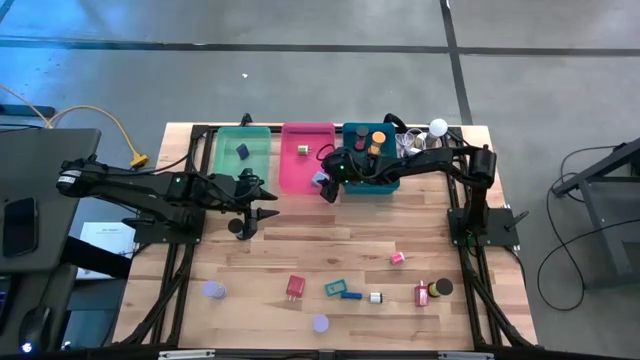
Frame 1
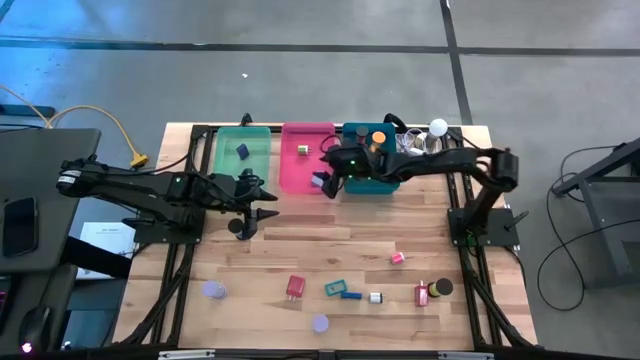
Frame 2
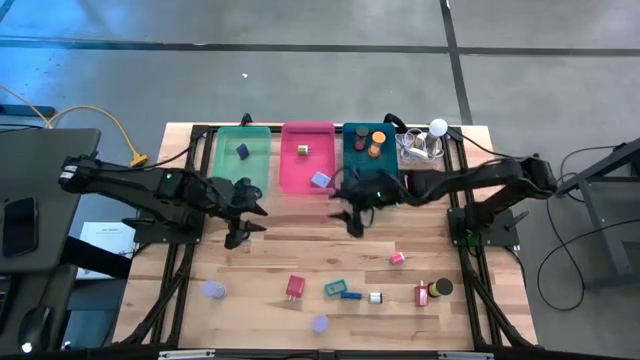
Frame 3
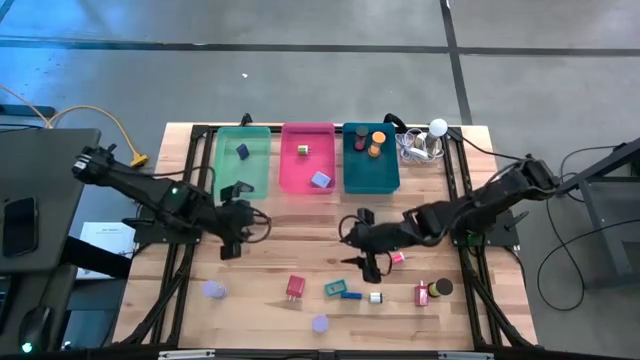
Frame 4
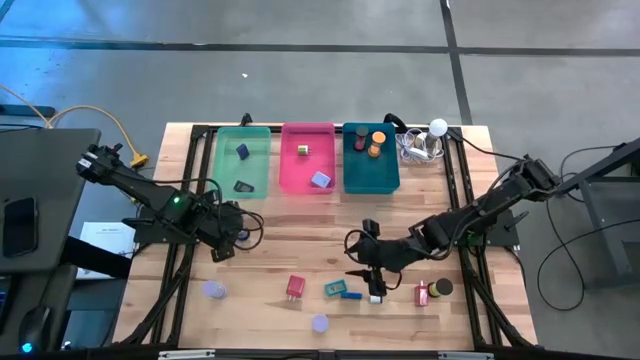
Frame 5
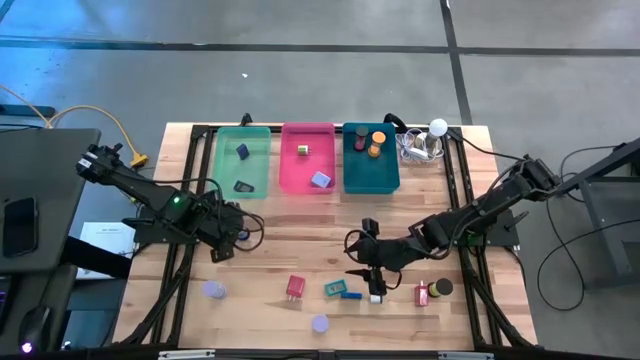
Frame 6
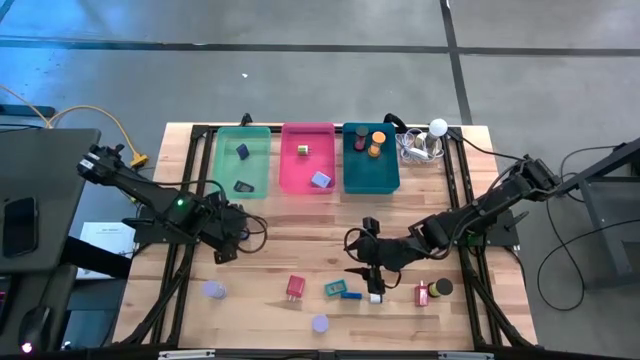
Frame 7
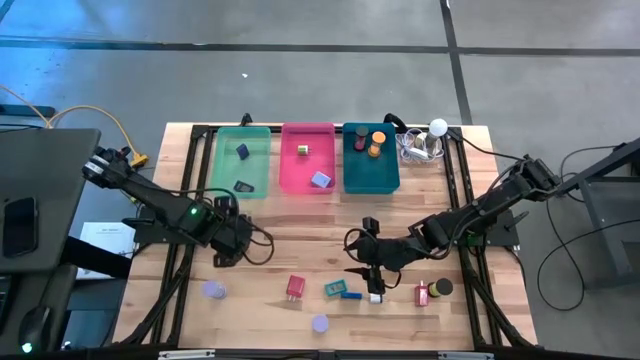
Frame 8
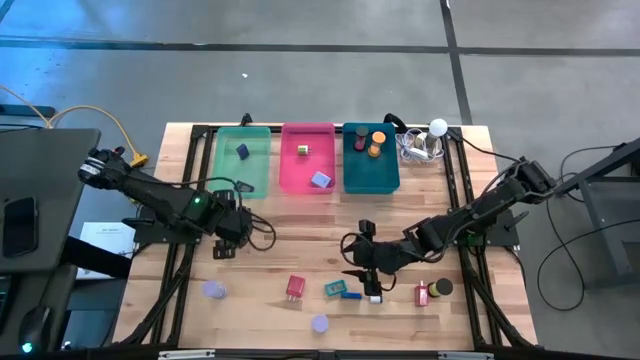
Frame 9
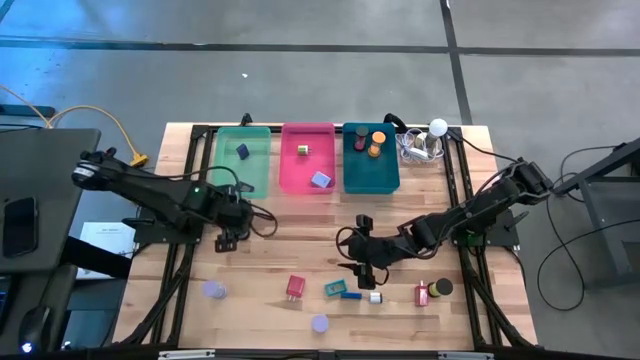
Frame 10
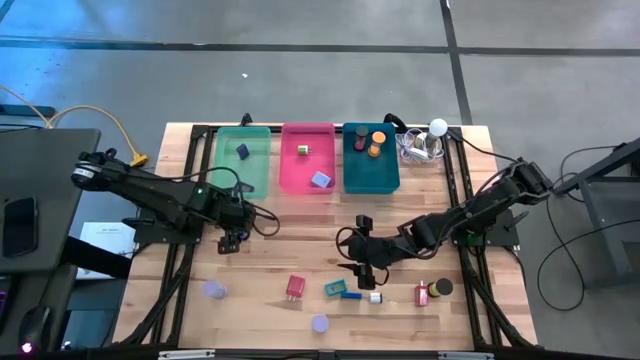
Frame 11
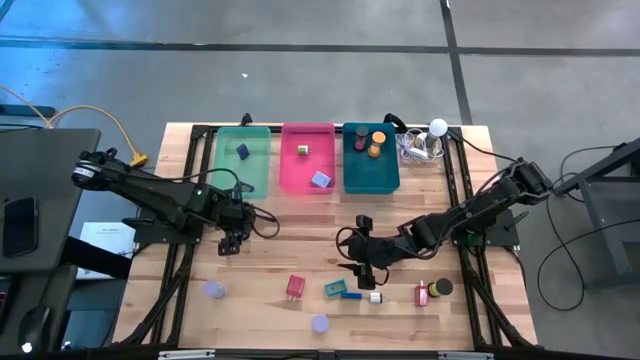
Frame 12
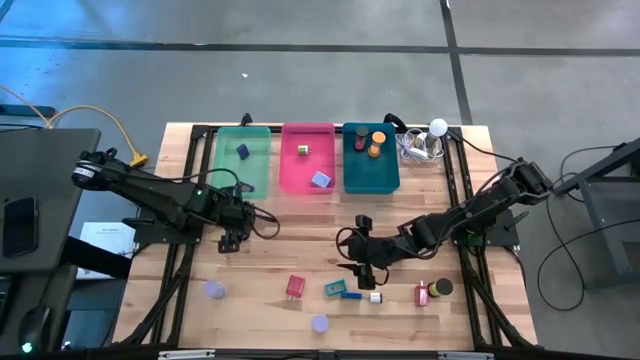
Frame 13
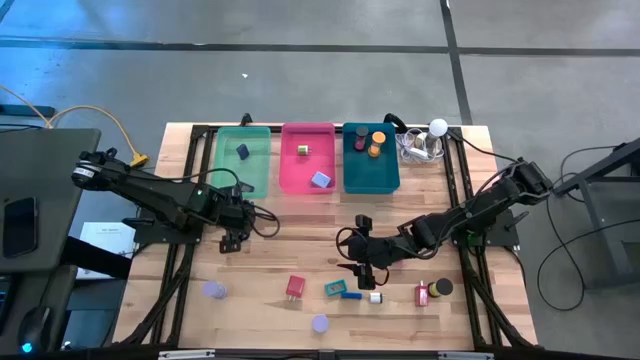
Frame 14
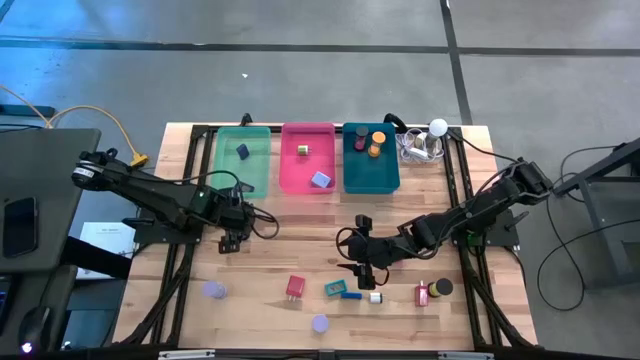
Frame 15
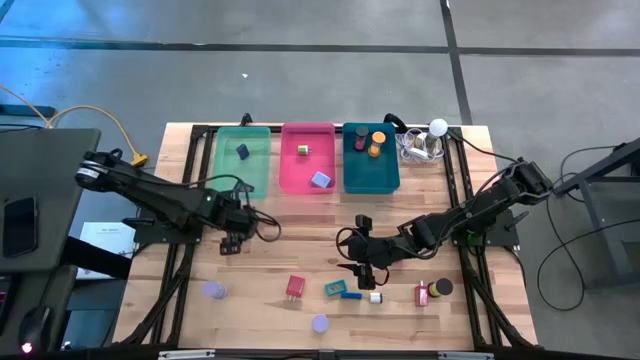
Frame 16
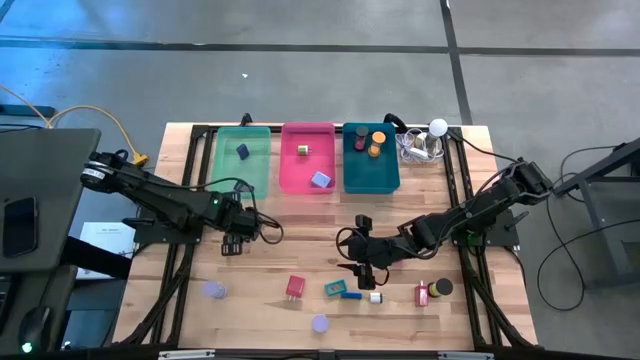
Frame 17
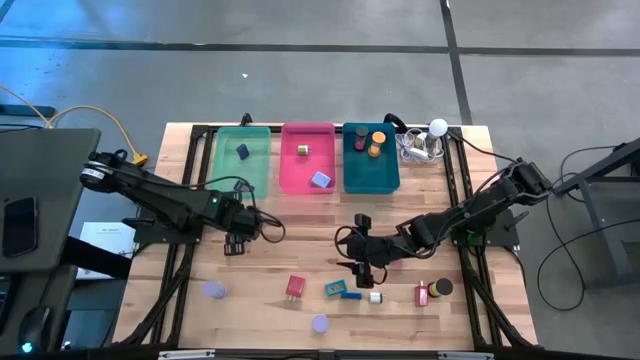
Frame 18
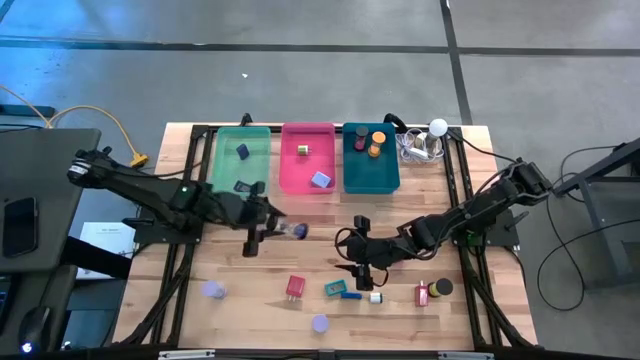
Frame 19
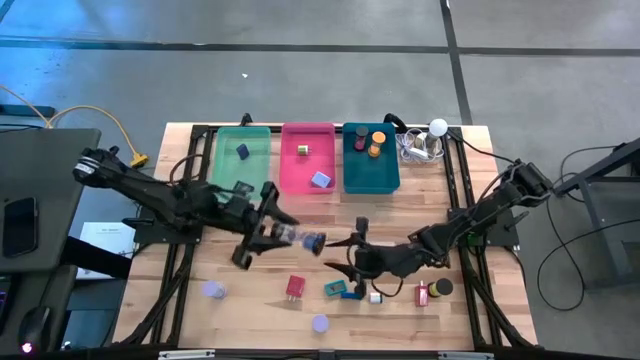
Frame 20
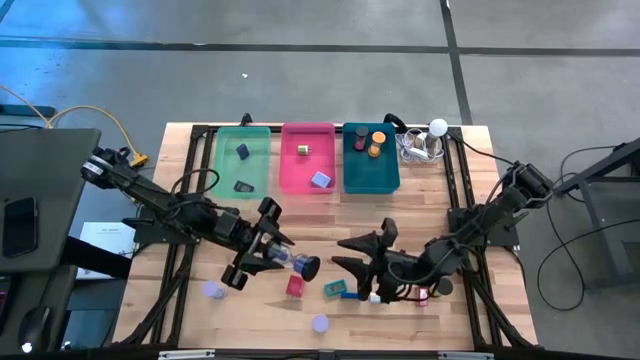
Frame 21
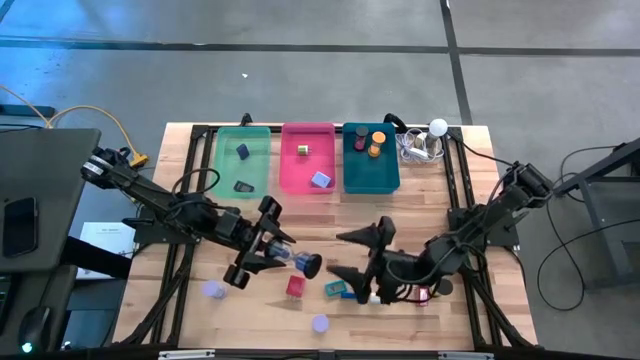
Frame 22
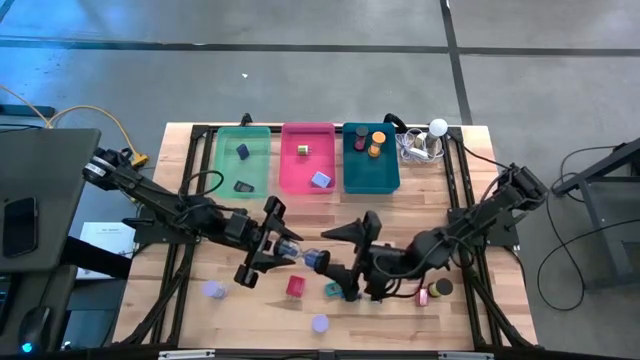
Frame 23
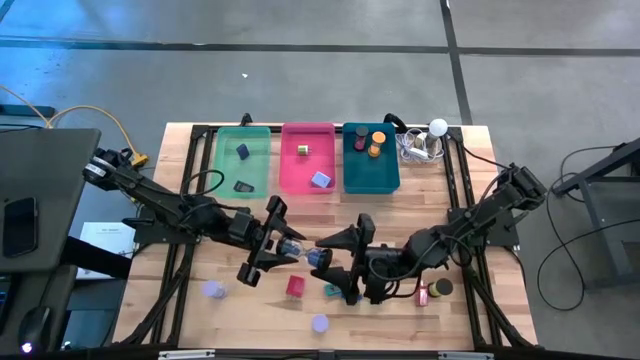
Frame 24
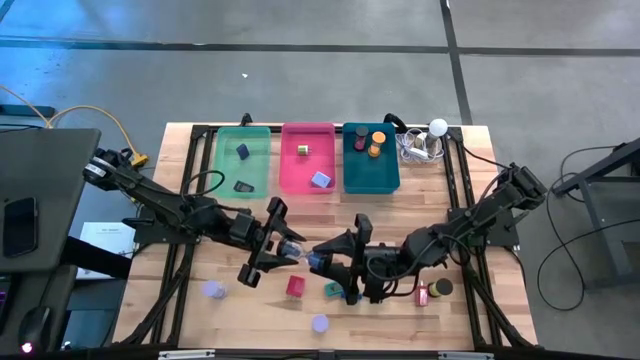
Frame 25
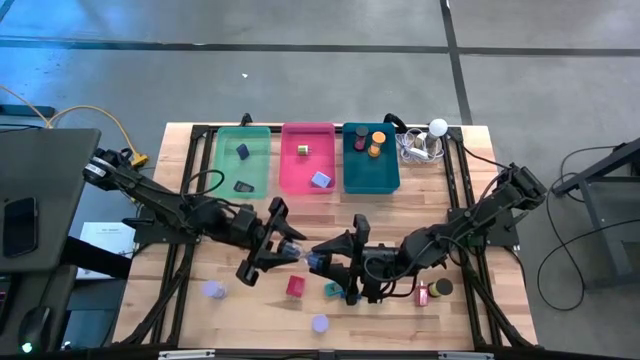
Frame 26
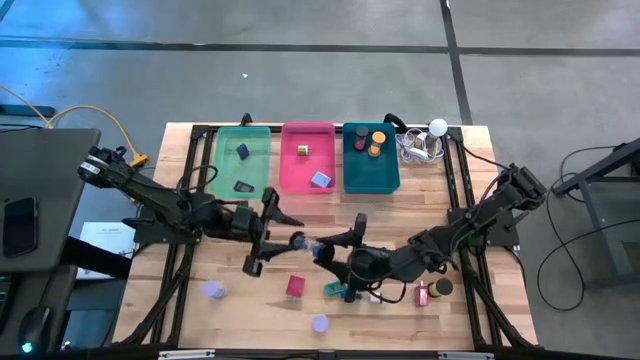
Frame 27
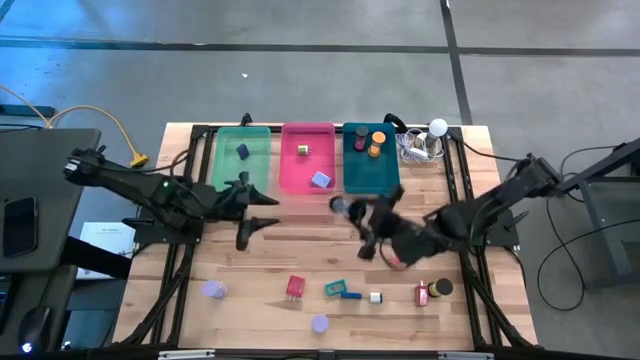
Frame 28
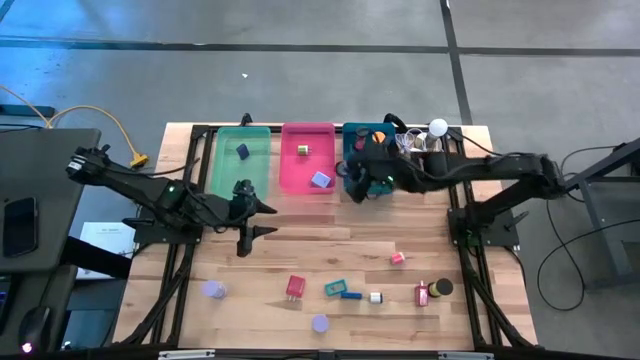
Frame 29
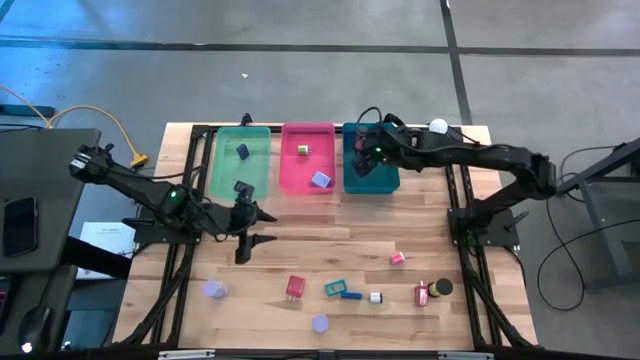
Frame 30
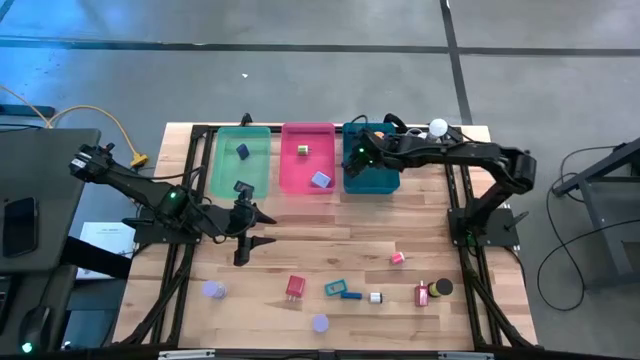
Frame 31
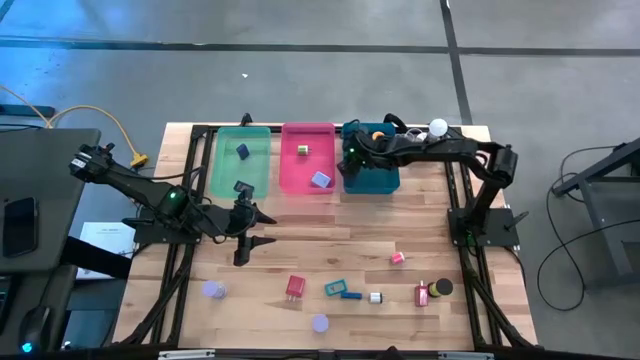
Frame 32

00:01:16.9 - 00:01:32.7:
Task: Pick & Place Office items
Put the blue hourglass into the blue bin

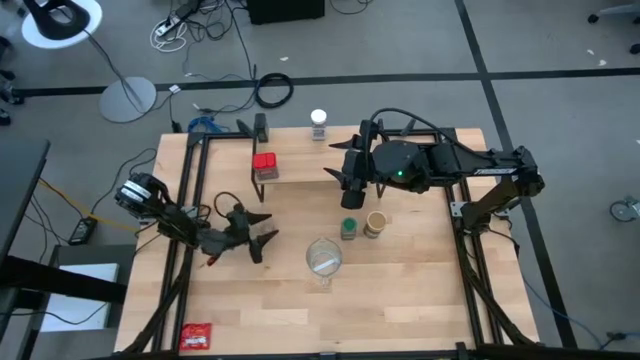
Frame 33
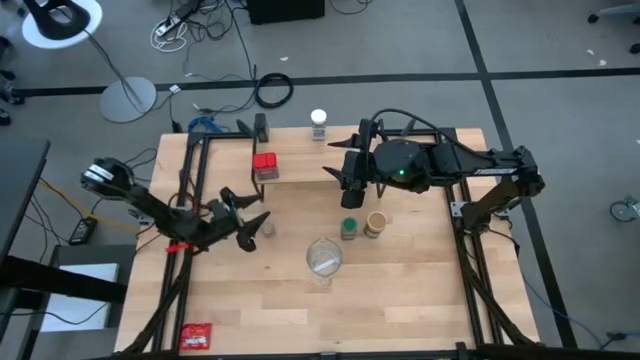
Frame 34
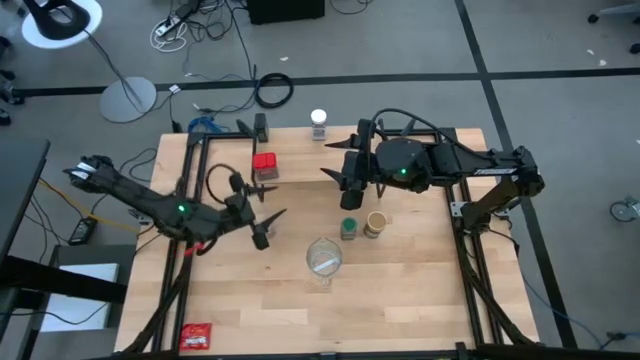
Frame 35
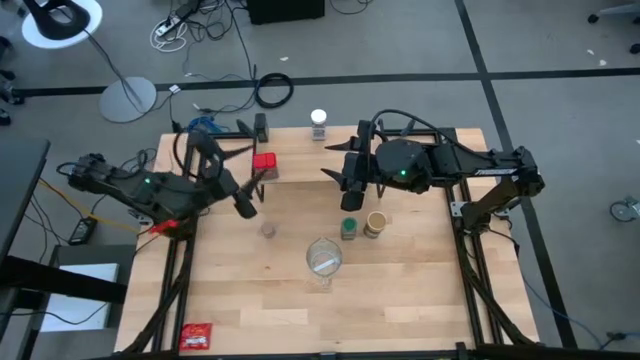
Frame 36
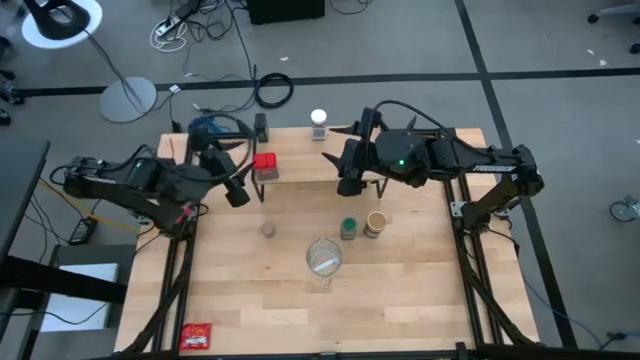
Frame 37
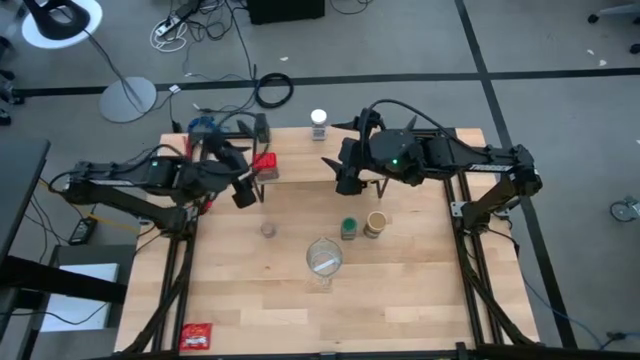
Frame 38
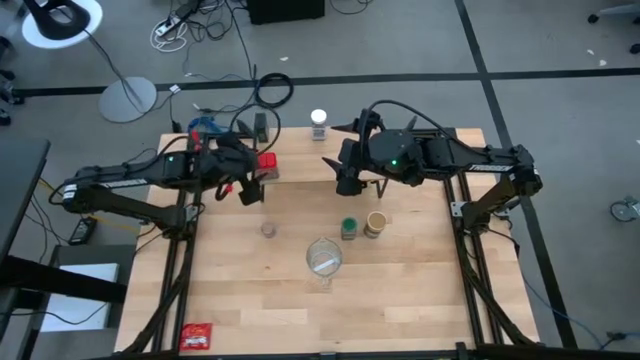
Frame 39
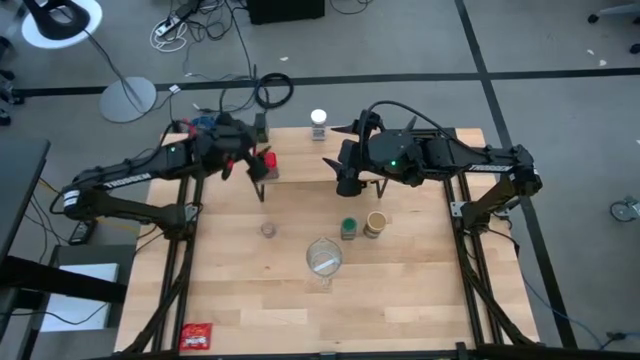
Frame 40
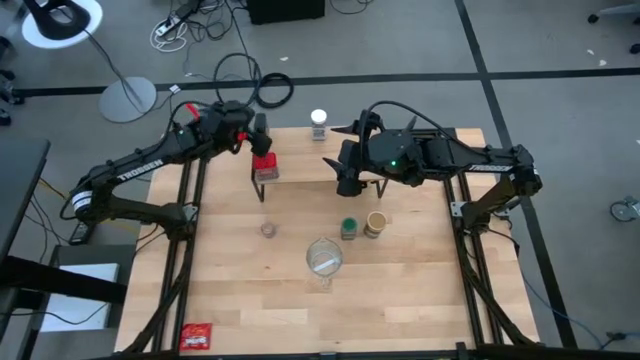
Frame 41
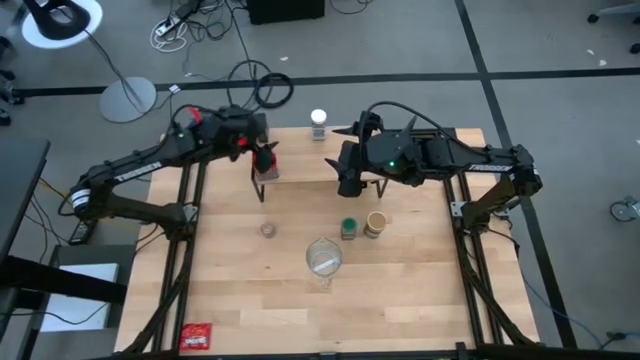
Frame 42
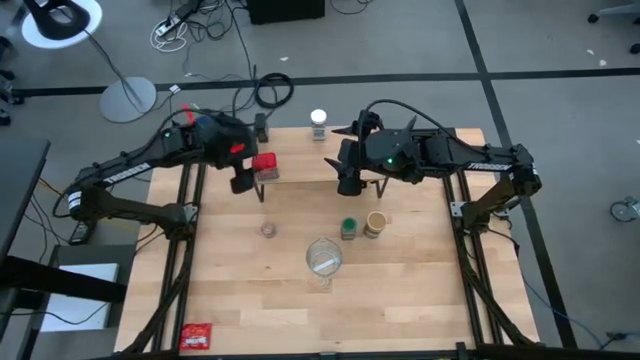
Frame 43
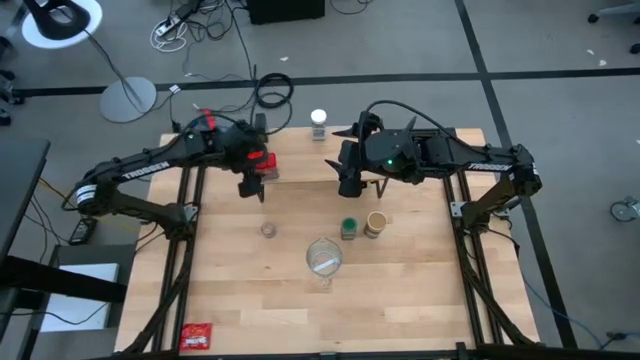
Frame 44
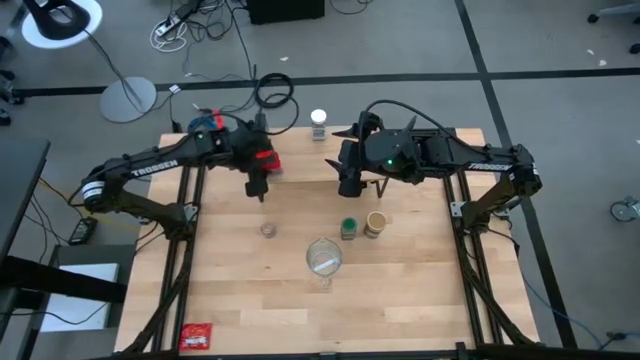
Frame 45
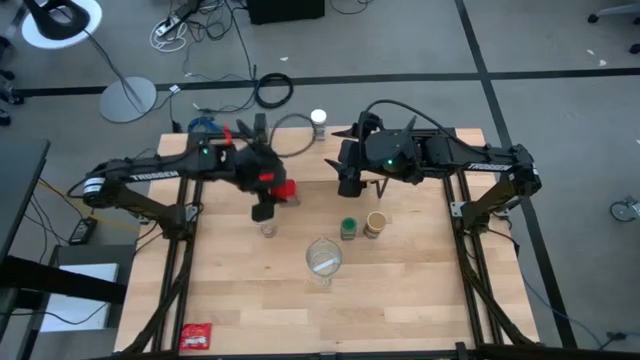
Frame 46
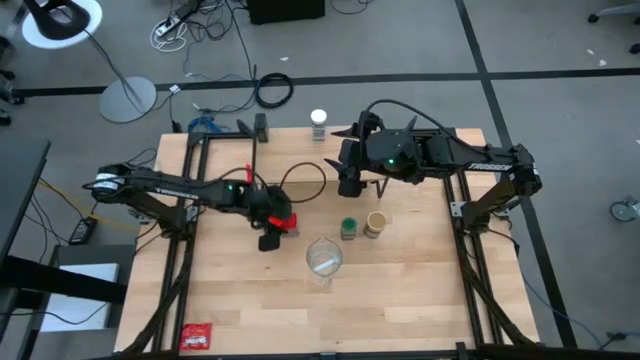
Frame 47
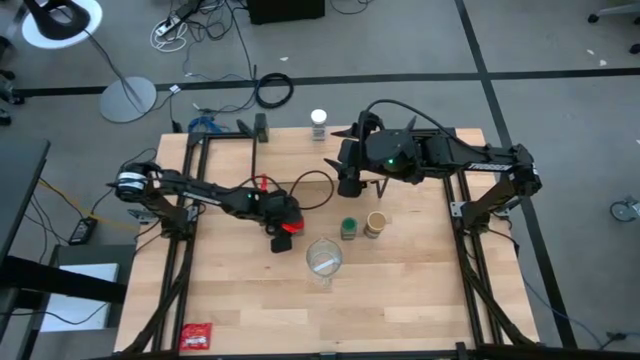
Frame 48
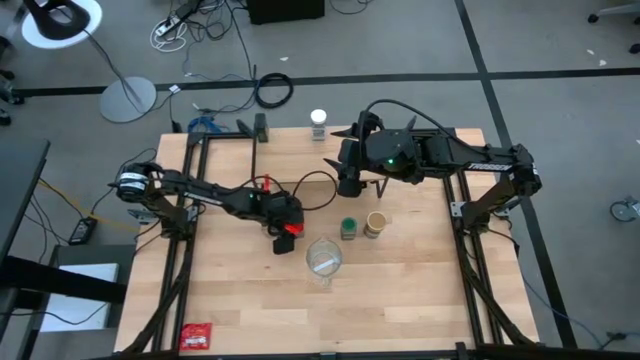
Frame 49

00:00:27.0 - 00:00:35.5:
Task: Shelf spices
Remove the red seasoning can from the shelf
